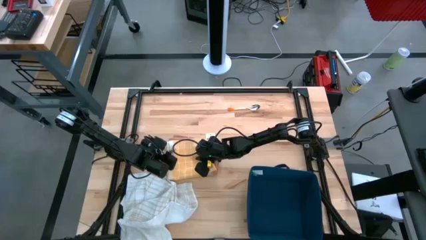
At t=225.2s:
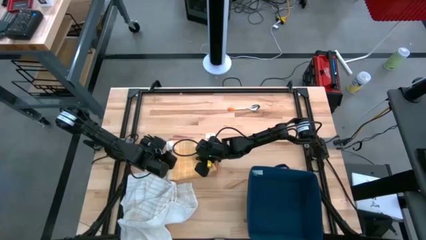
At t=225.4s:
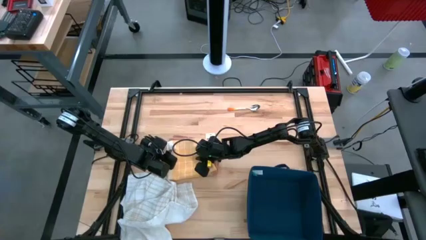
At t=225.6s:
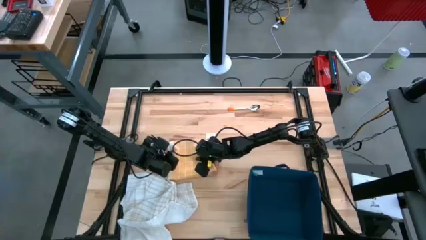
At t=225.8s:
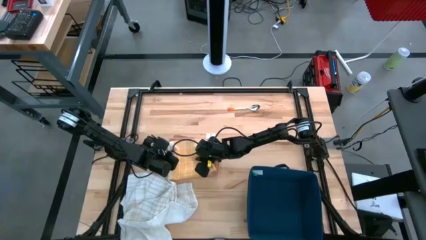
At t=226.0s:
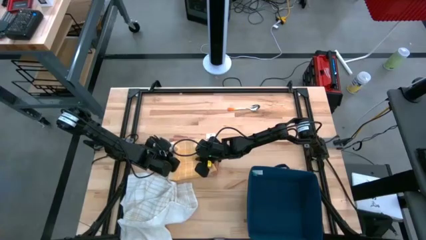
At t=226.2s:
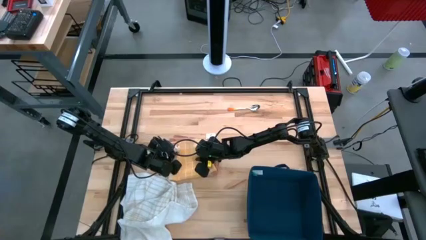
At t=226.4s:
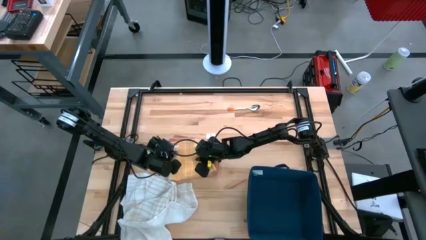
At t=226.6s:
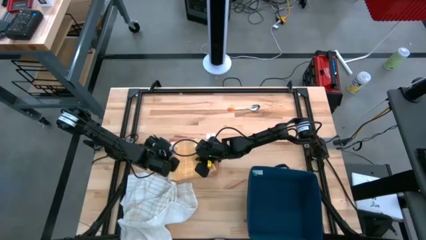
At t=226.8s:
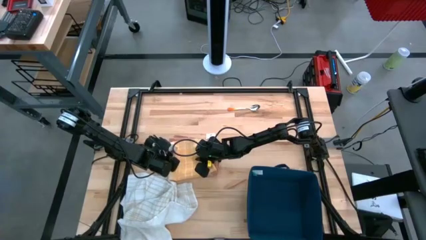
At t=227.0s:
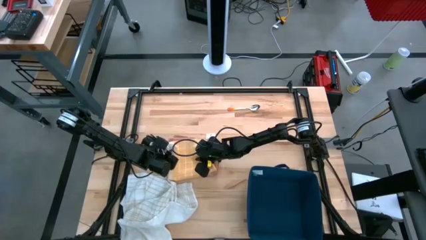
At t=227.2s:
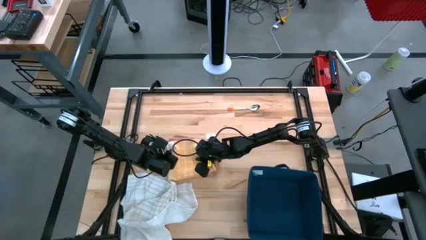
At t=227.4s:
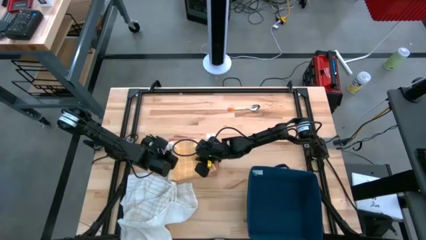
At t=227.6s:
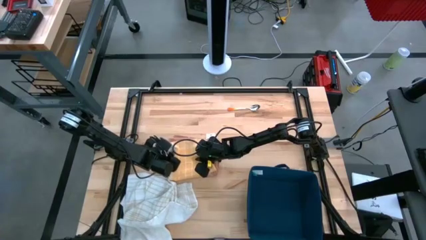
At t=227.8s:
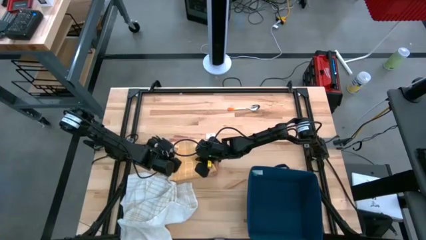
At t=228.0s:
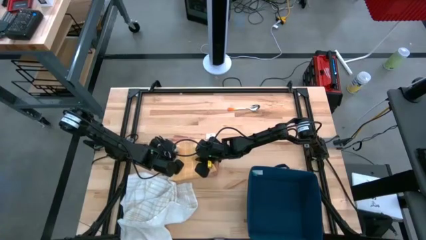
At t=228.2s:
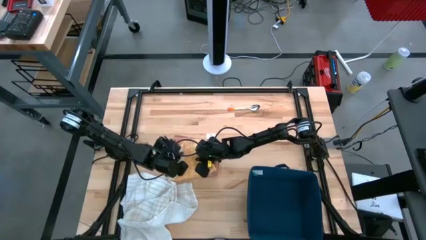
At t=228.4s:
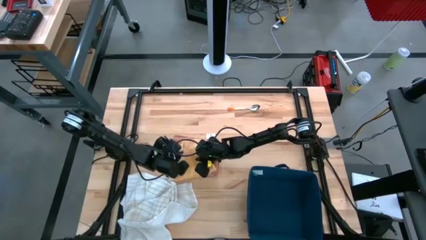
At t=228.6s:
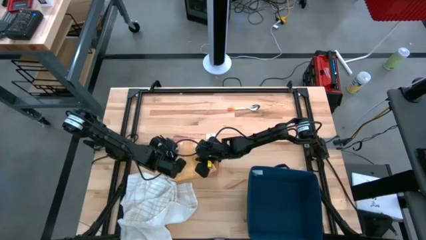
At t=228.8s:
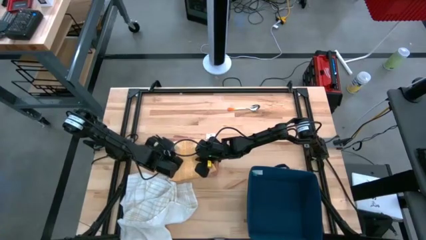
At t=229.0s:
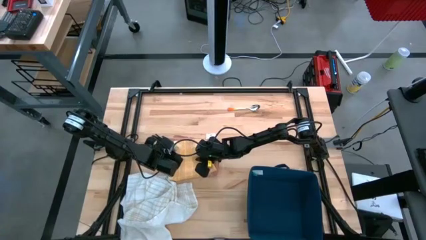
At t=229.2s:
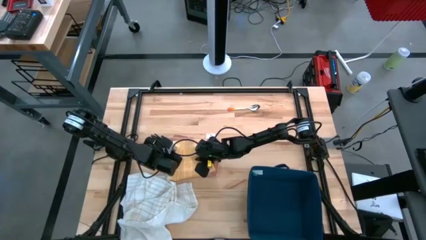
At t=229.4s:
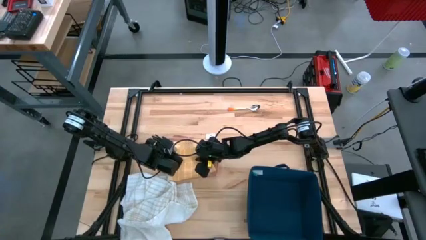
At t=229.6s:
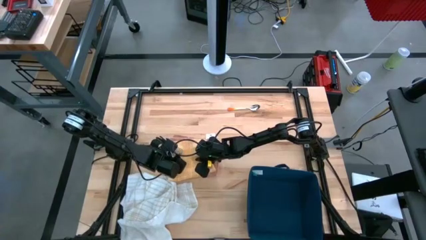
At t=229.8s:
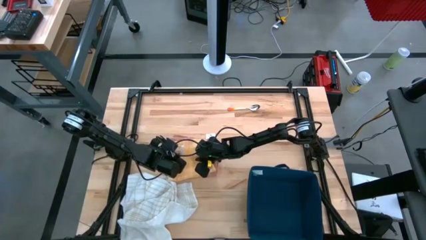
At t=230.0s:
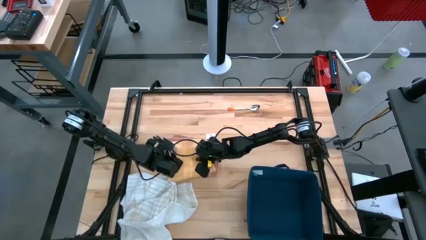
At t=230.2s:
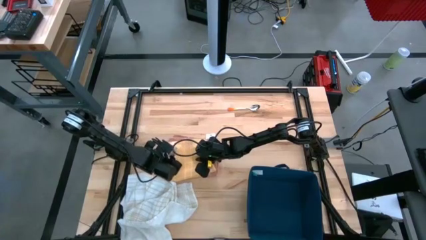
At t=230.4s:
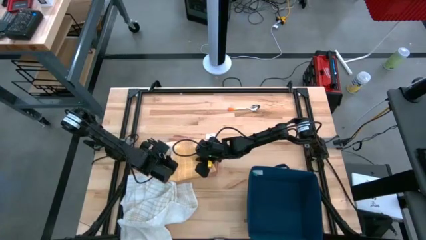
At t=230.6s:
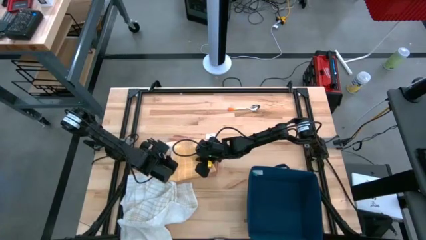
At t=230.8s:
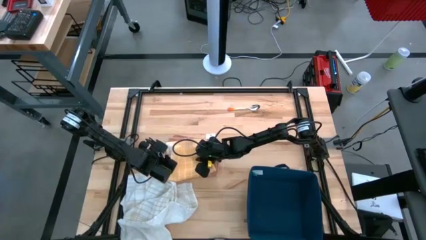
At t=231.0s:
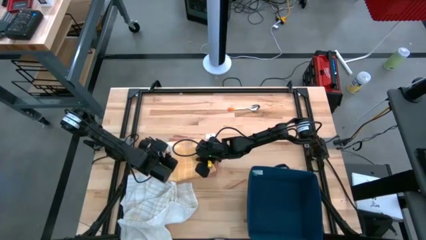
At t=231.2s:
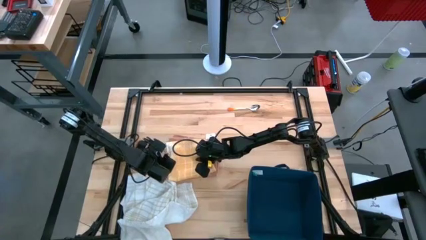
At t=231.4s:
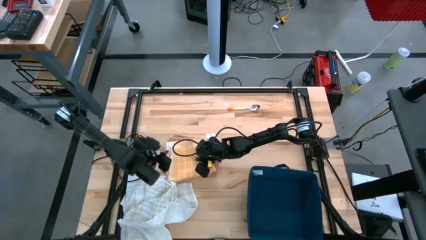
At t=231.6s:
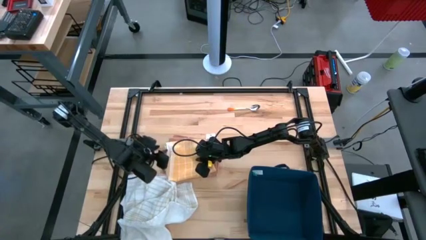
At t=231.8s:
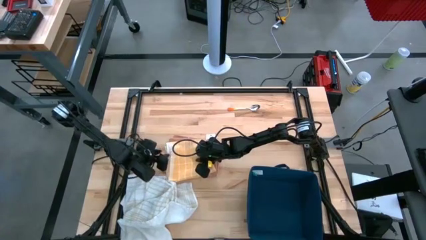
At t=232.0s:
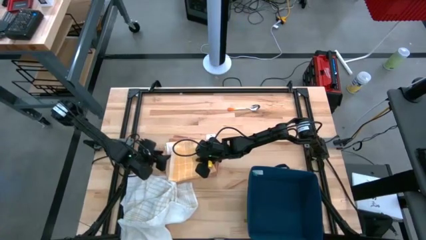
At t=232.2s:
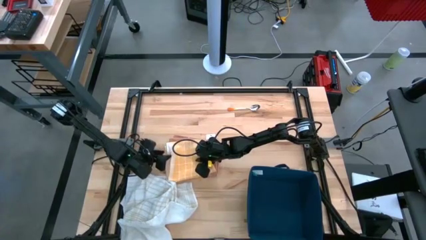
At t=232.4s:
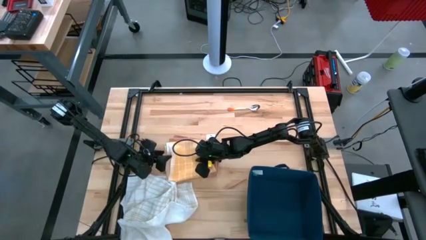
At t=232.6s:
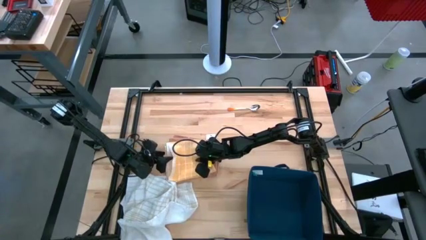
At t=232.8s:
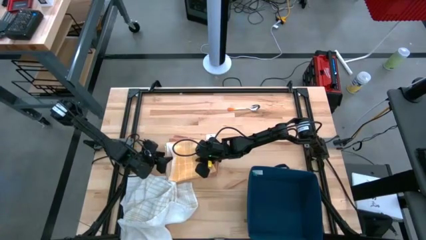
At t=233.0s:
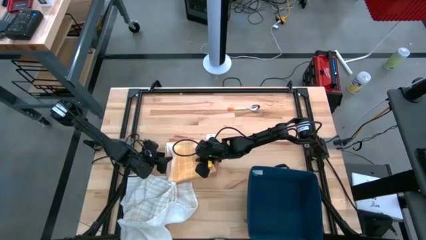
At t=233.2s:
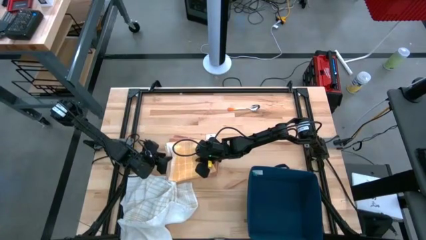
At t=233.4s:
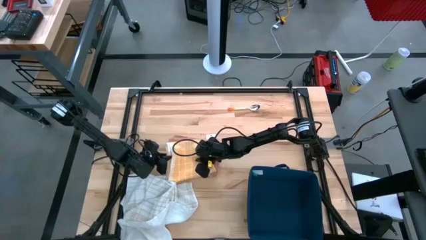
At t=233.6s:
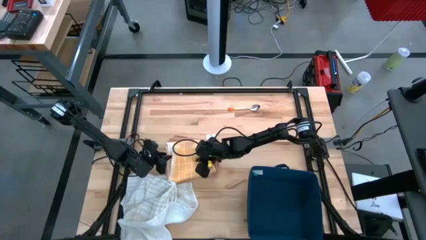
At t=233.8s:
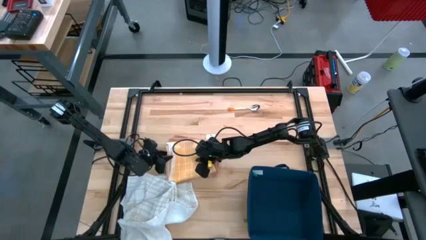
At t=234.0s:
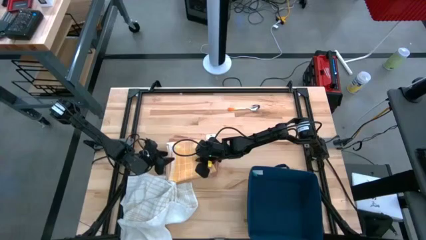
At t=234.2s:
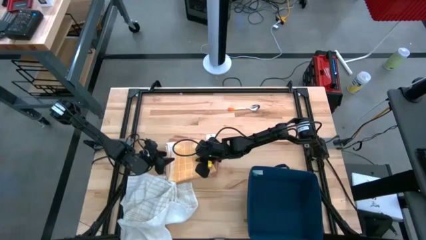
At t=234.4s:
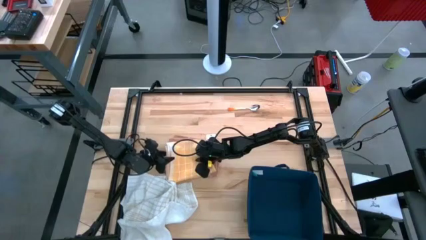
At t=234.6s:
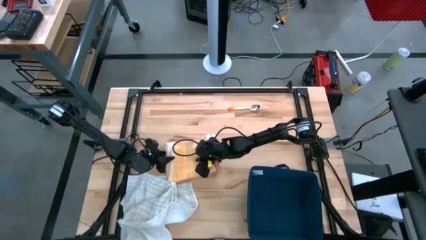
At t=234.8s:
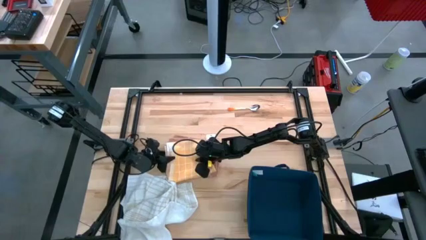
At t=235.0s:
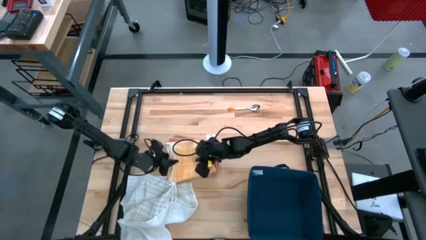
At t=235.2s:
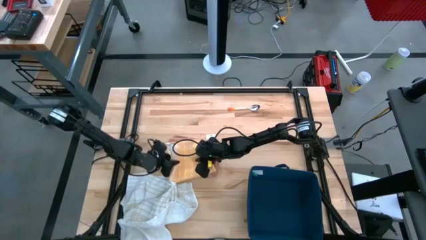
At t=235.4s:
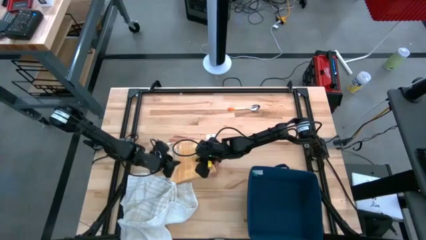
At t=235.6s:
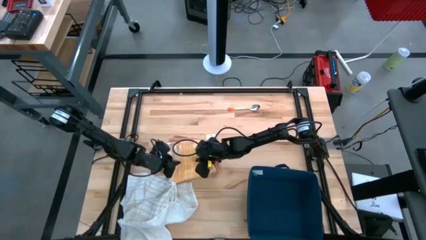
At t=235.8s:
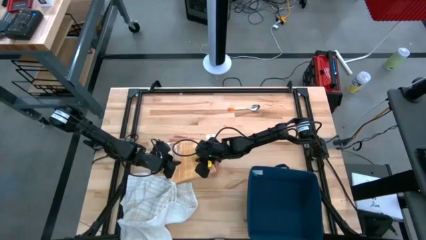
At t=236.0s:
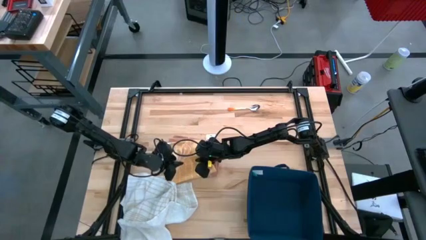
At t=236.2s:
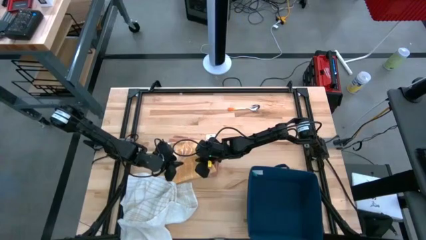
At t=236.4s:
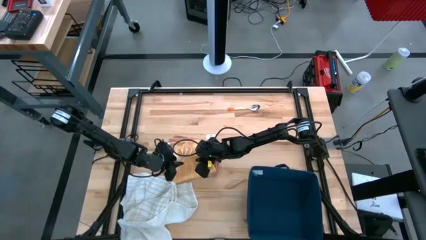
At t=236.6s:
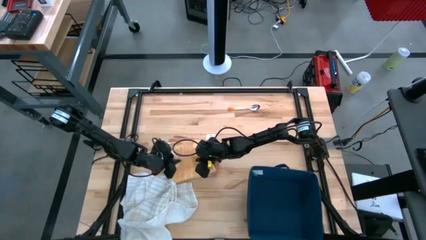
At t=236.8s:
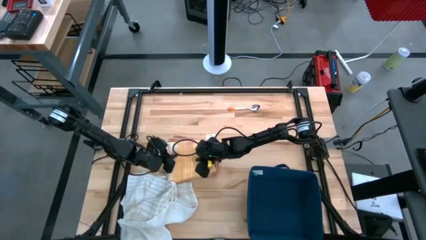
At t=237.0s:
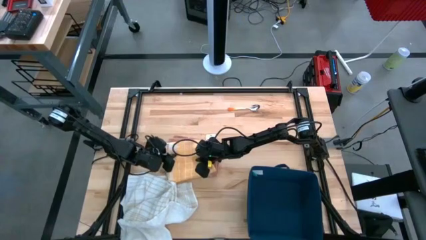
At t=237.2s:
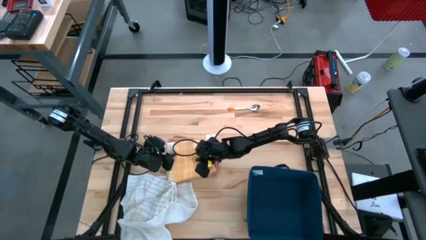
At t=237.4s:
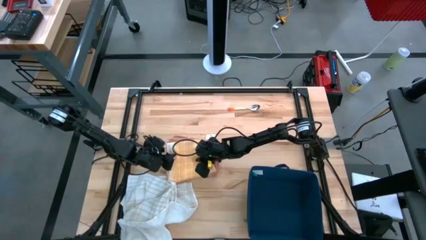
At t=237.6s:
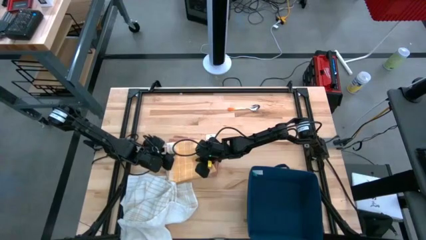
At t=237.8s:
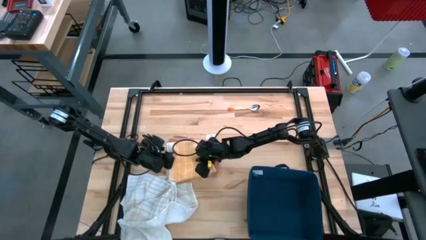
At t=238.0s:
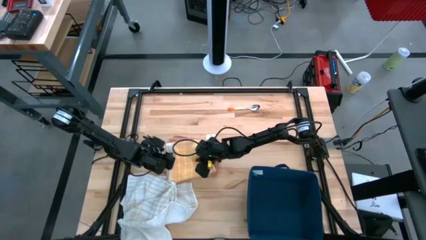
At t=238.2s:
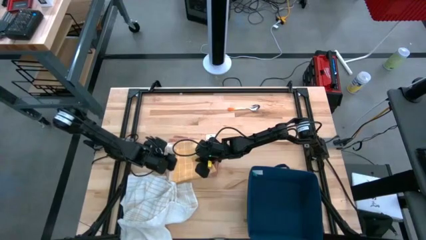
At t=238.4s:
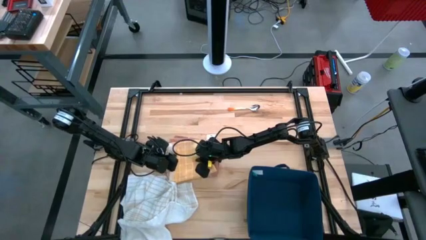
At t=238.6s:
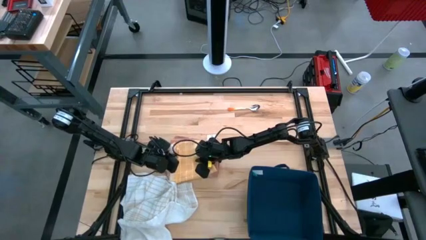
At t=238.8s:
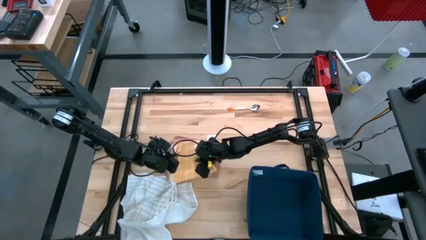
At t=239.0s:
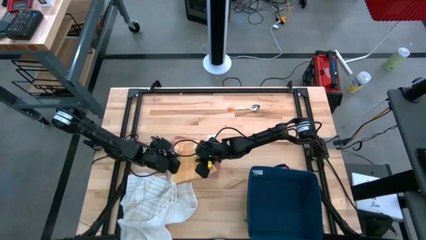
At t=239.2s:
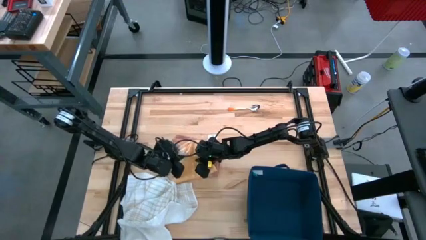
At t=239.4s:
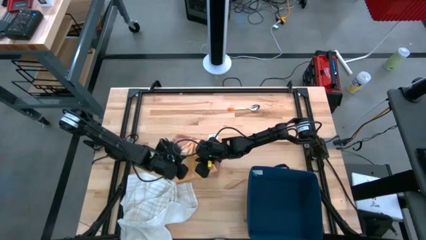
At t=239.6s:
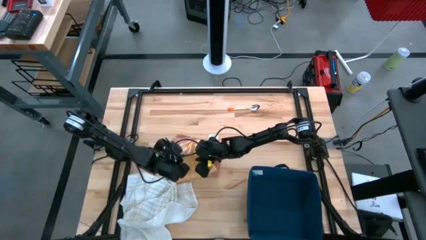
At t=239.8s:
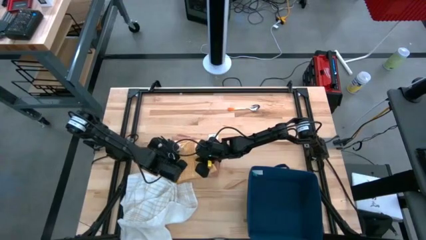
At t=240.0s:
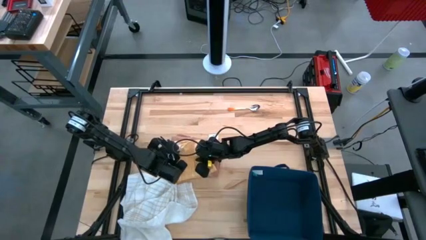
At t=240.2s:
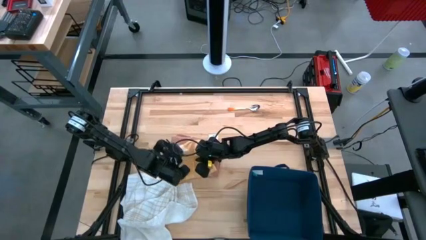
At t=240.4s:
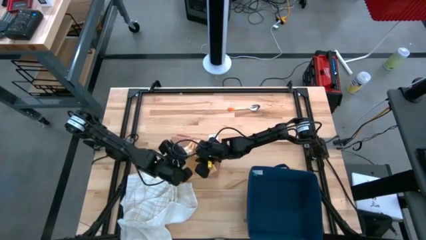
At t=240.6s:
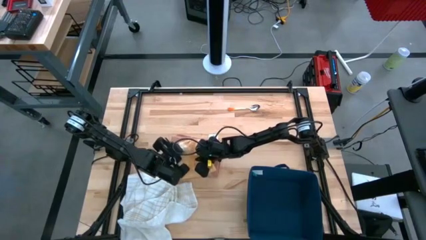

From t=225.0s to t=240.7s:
Task: Fold towel
Stack the folded yellow towel on top of the folded brown towel
